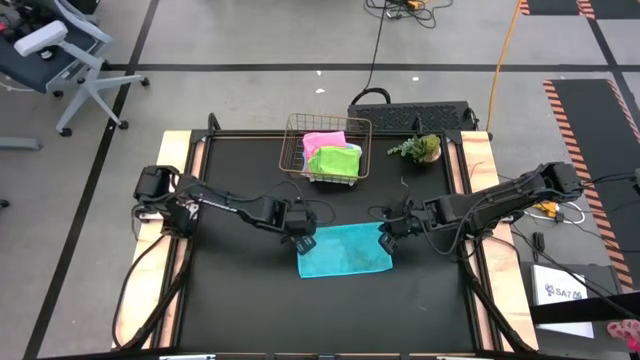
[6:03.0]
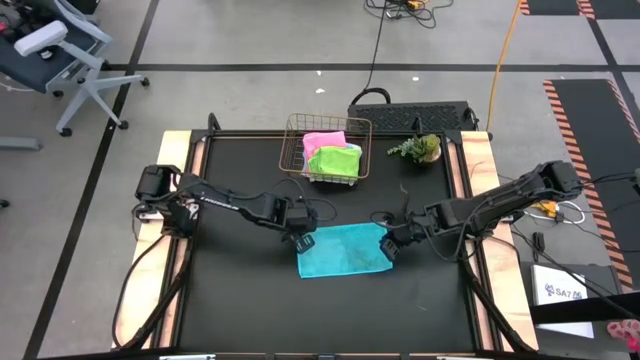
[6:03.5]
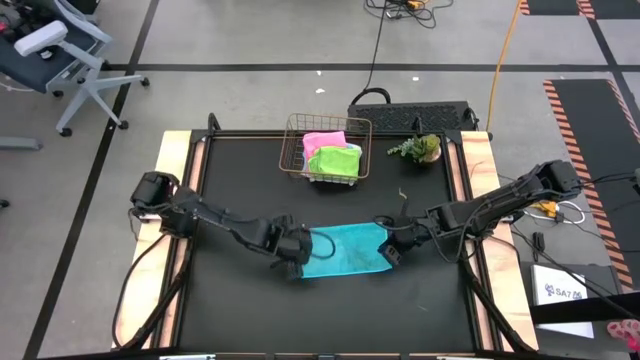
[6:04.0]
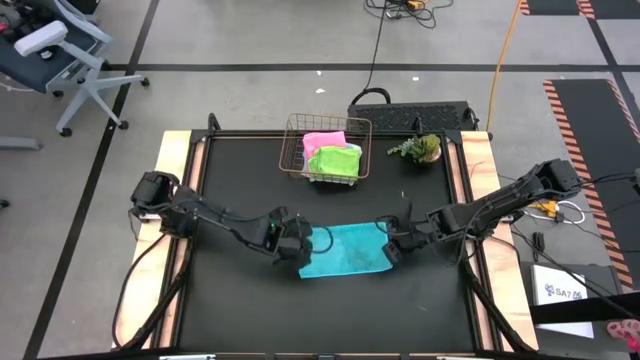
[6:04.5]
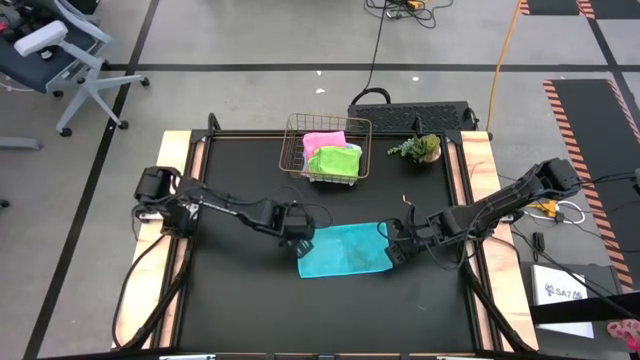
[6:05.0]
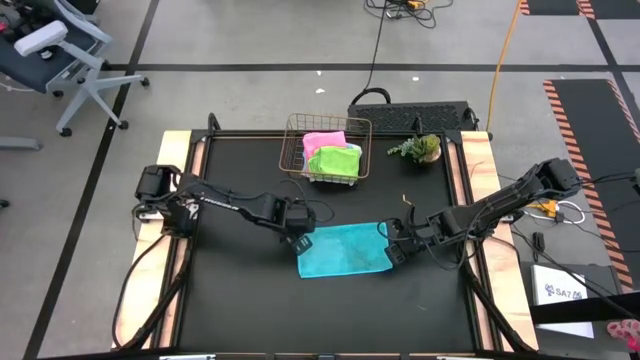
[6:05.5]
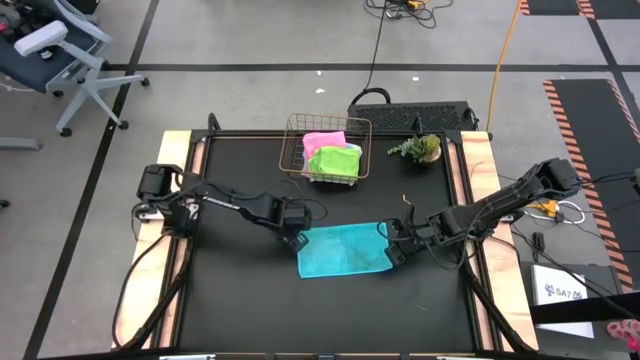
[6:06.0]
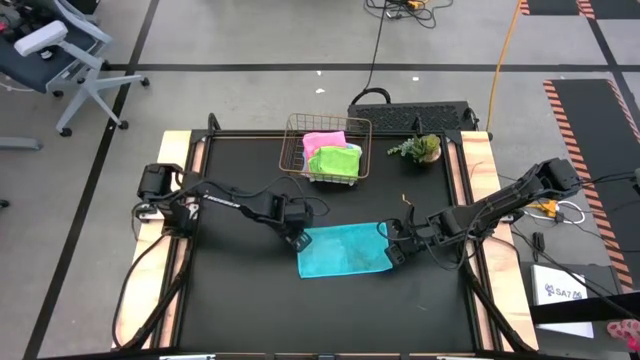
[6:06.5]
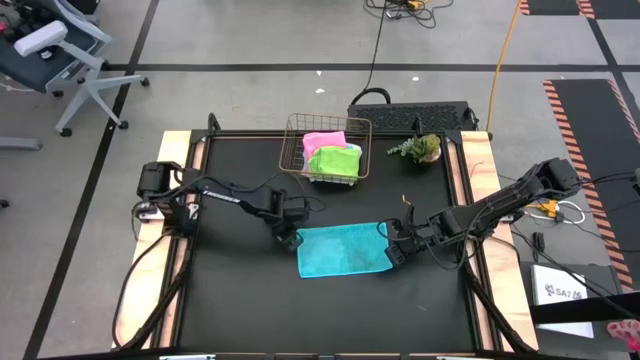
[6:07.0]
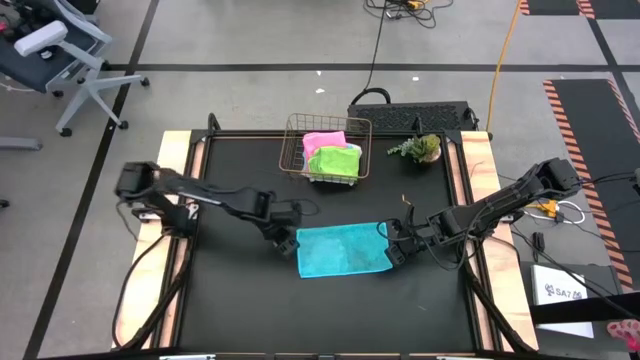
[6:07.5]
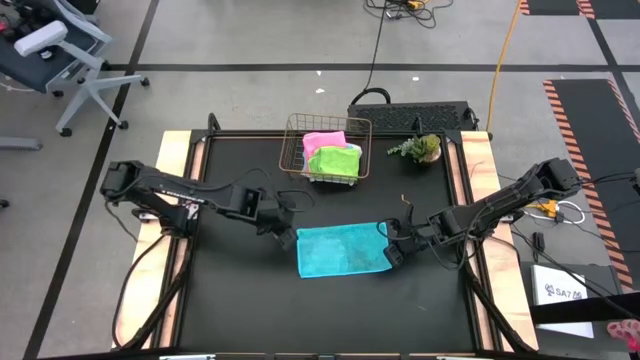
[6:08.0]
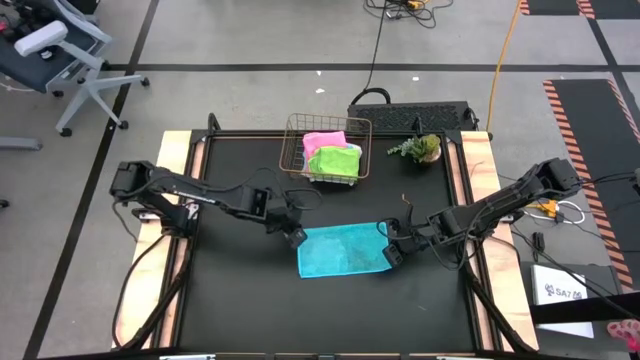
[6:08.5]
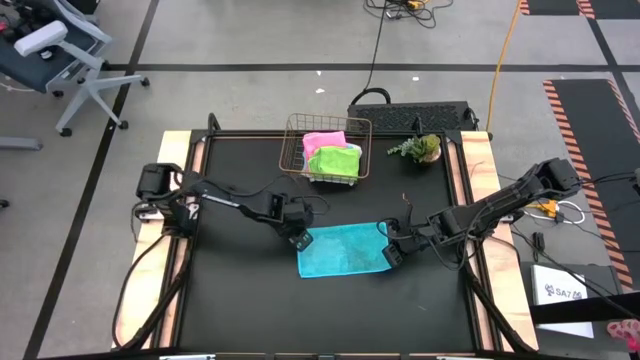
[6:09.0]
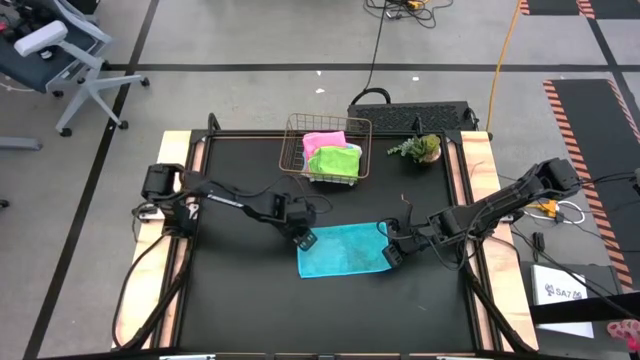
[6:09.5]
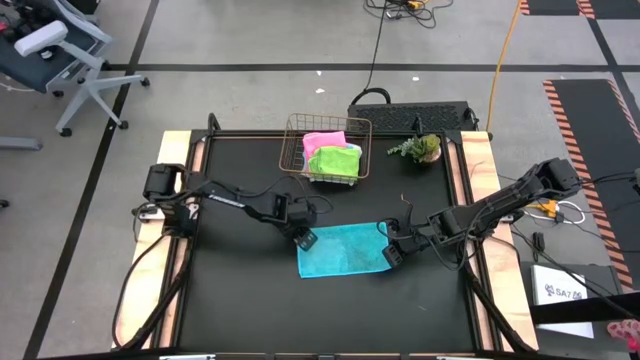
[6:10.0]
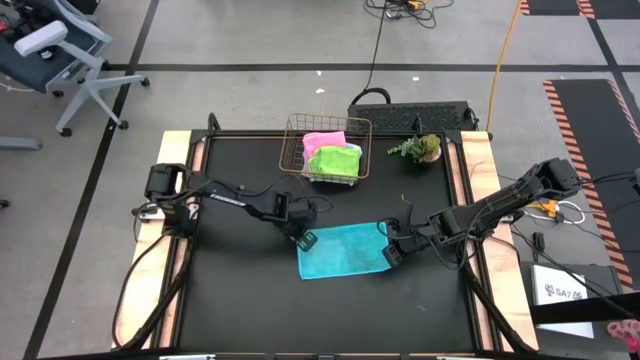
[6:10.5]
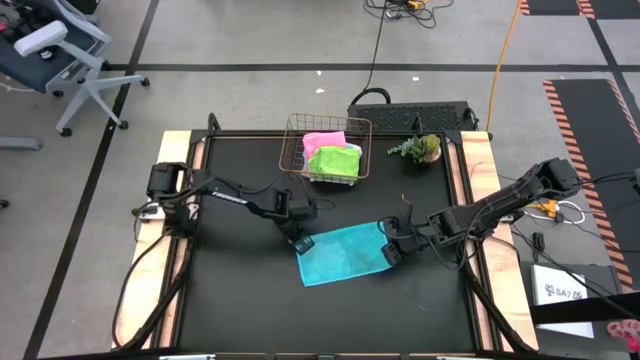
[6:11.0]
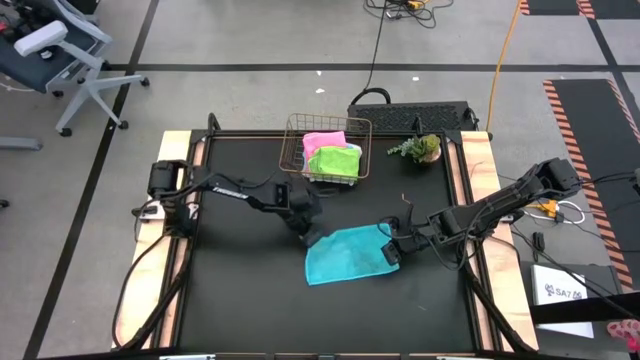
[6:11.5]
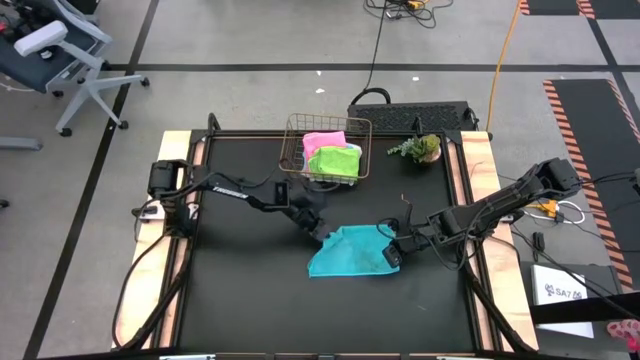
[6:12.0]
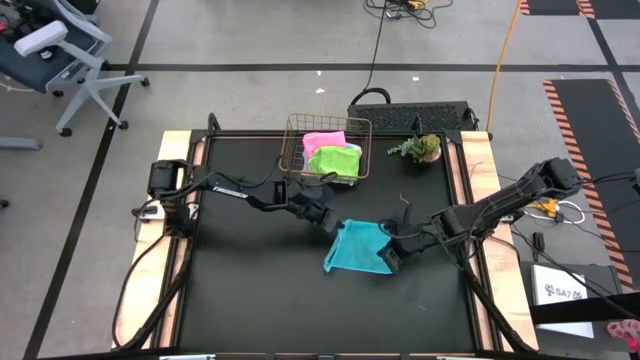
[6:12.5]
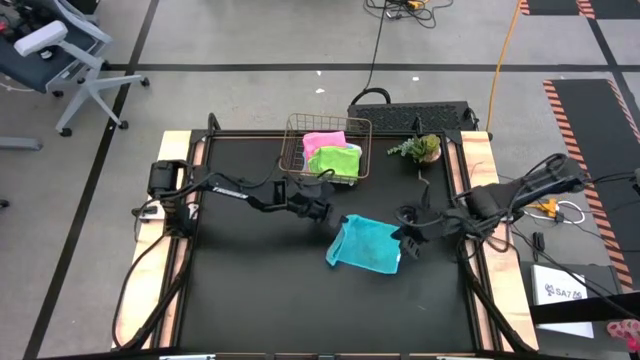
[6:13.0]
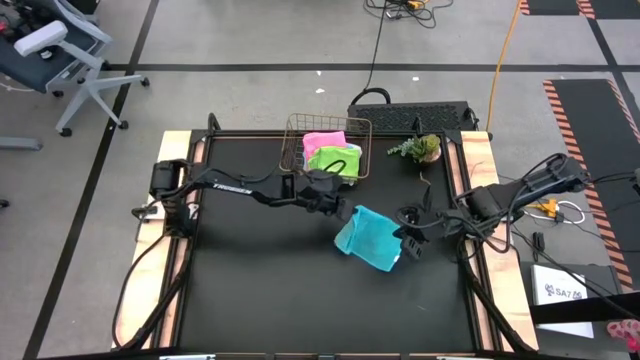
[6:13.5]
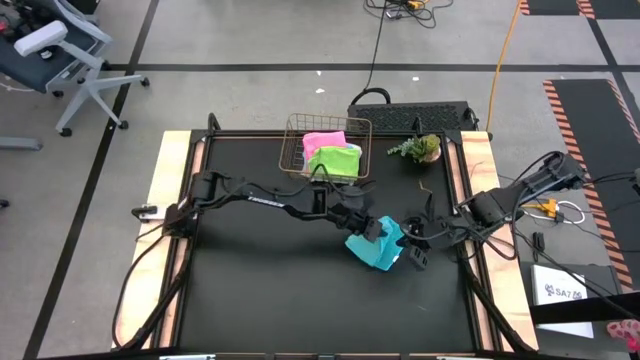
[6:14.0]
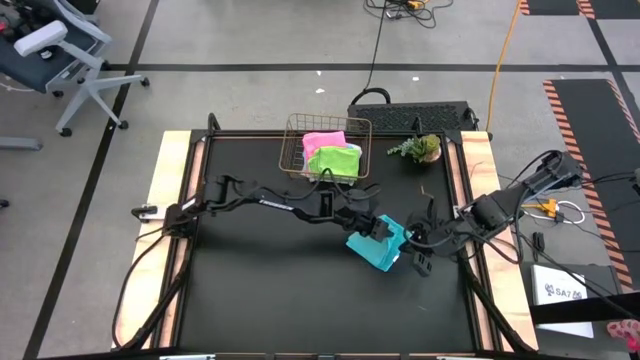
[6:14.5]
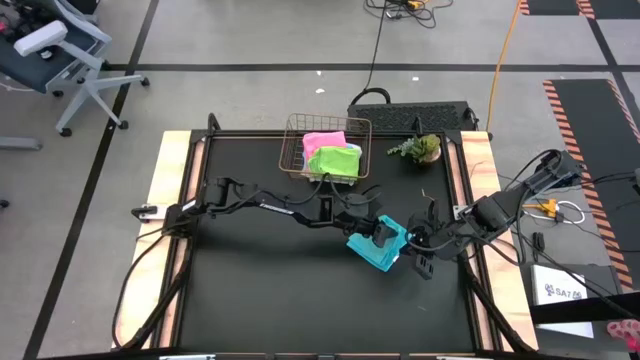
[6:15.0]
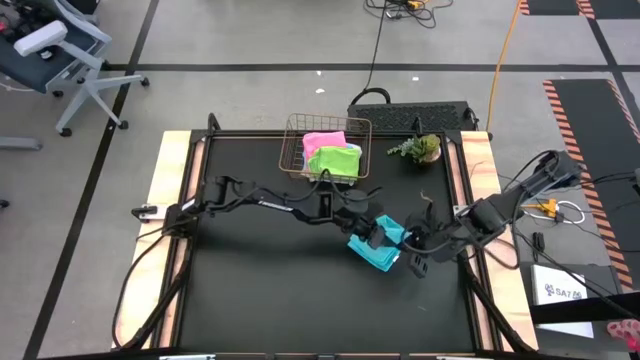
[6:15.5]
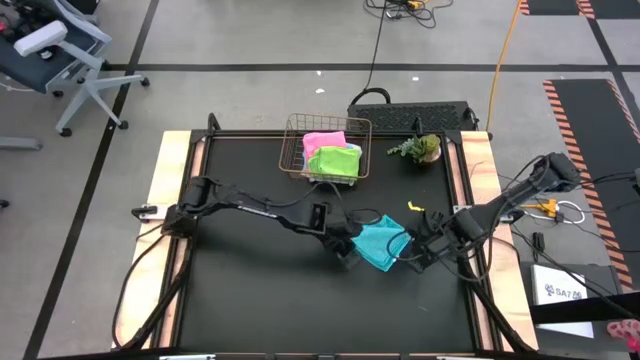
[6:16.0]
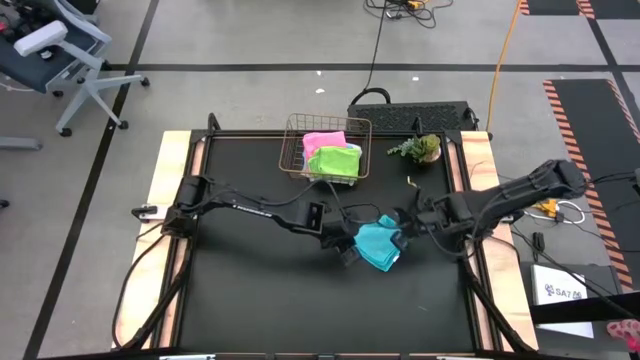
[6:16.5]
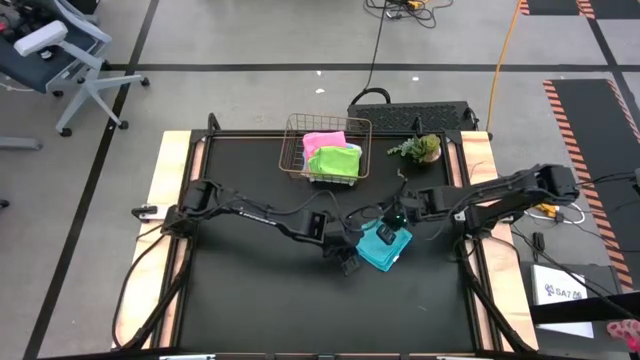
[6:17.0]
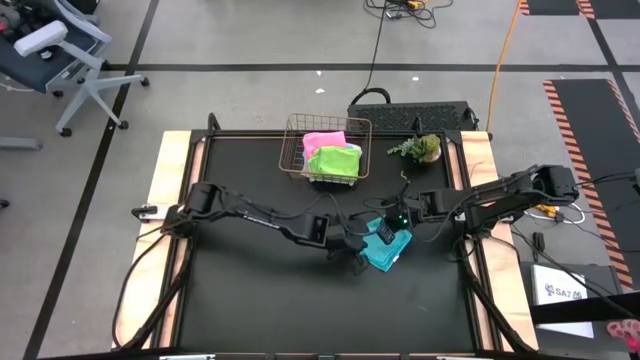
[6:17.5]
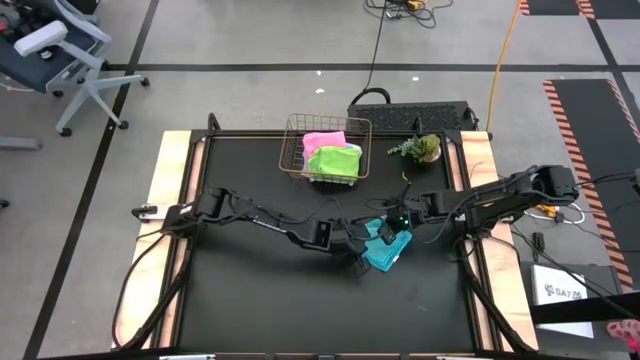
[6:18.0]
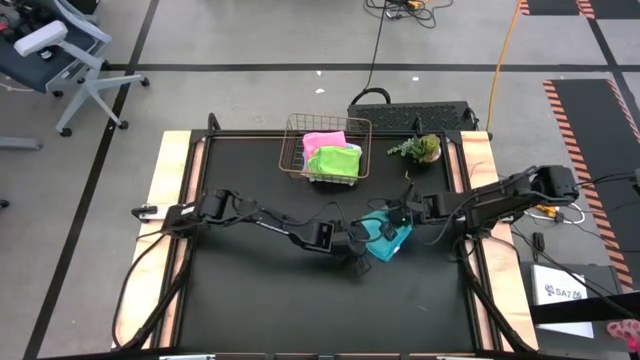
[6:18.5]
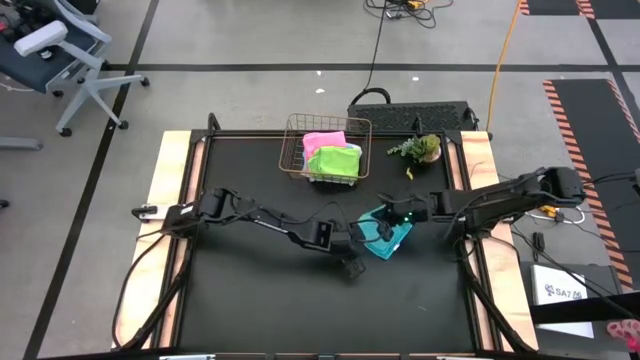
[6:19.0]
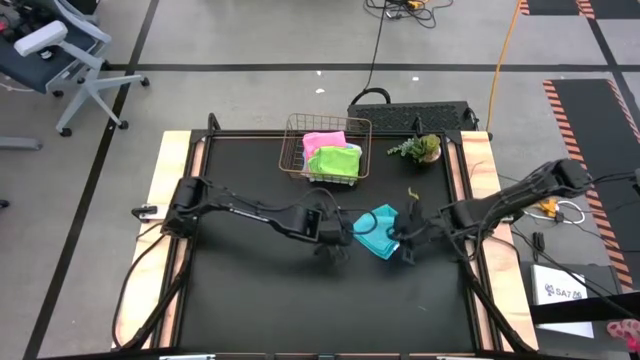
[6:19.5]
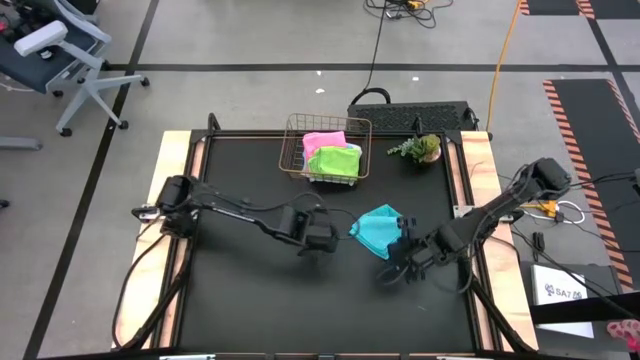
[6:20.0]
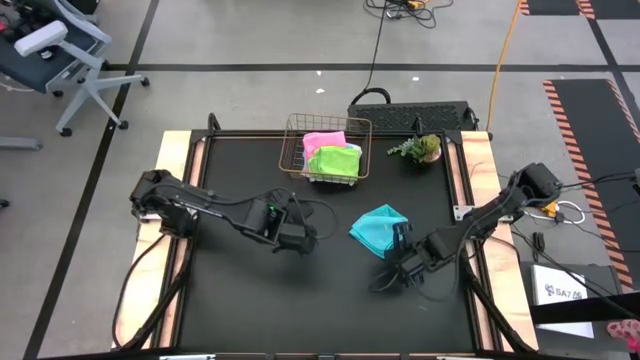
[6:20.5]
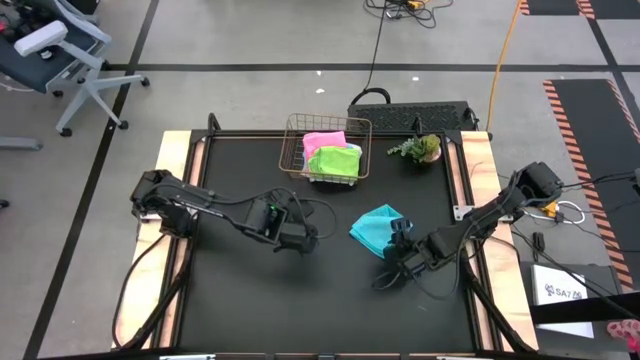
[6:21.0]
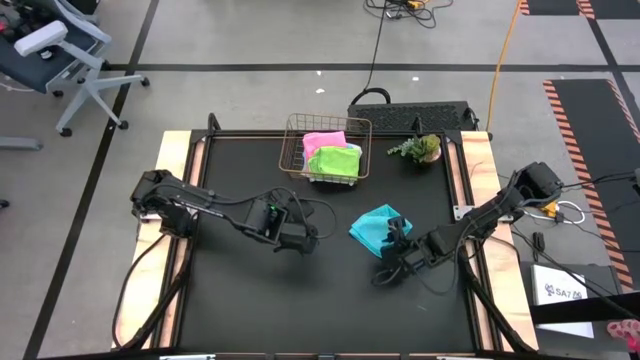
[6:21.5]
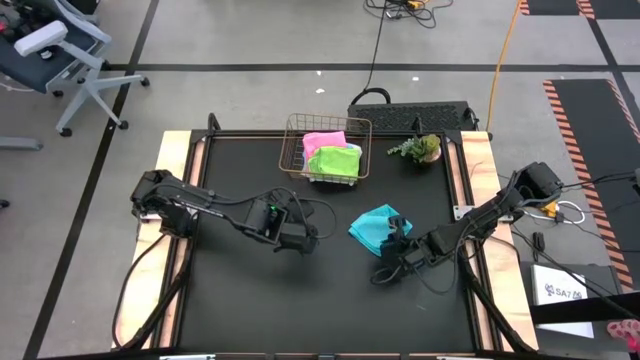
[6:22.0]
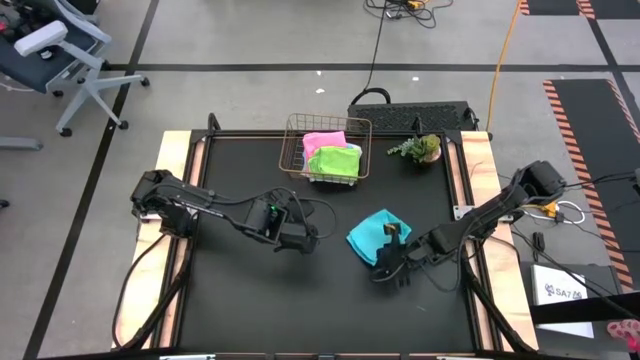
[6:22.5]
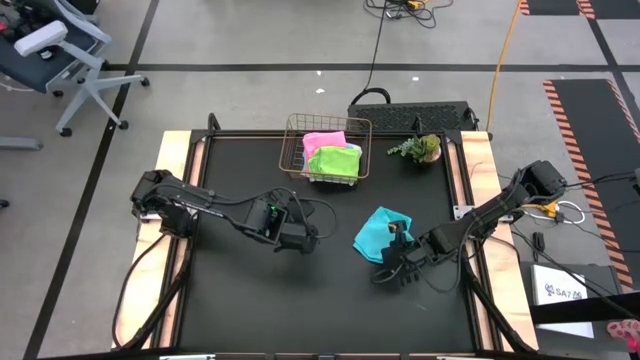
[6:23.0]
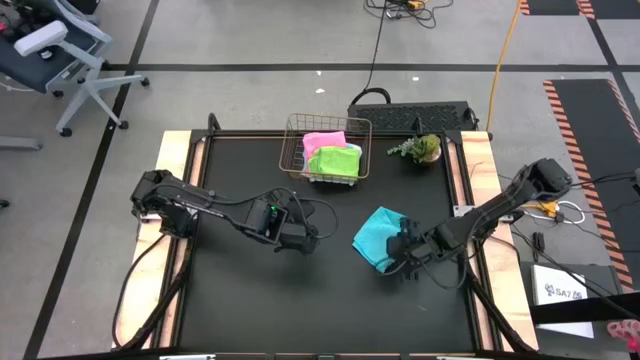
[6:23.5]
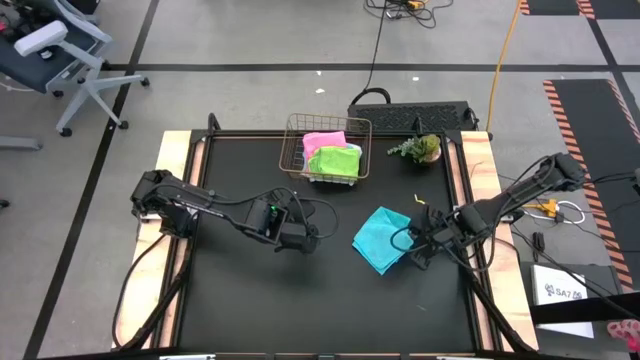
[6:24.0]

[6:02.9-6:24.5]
Task: Fold microfiber towels
Fold the blue microfiber cloth
